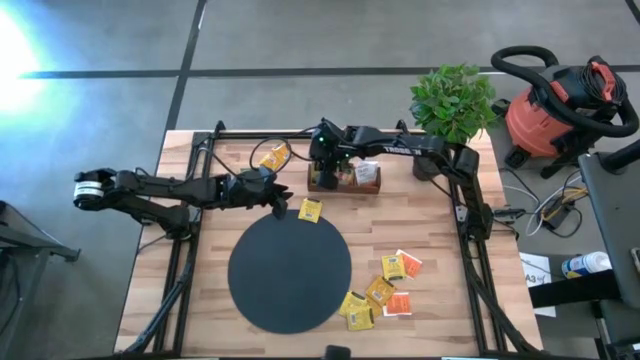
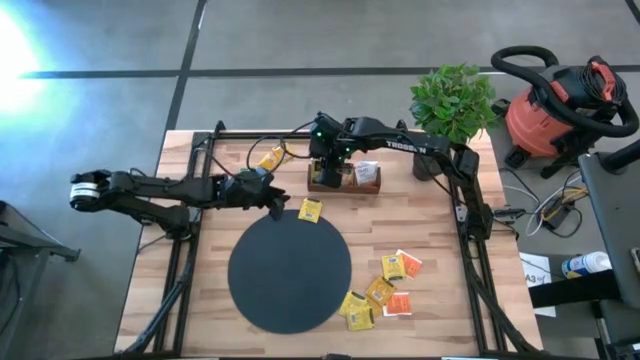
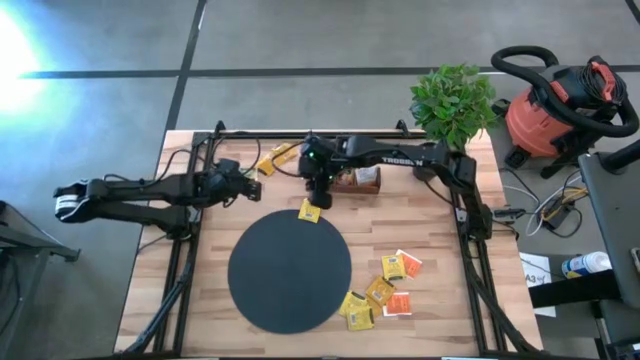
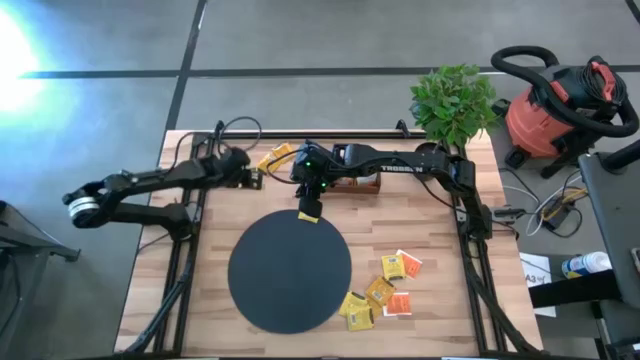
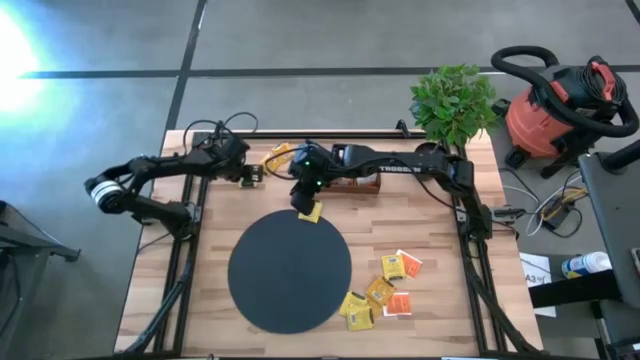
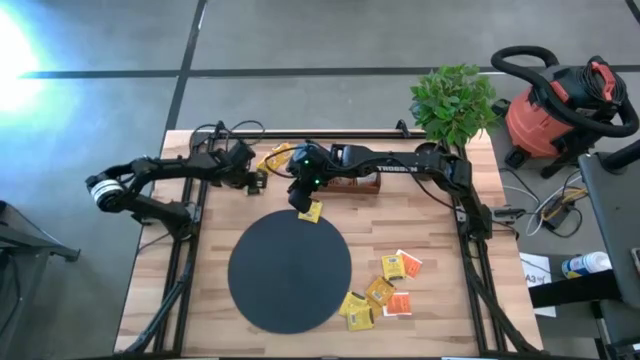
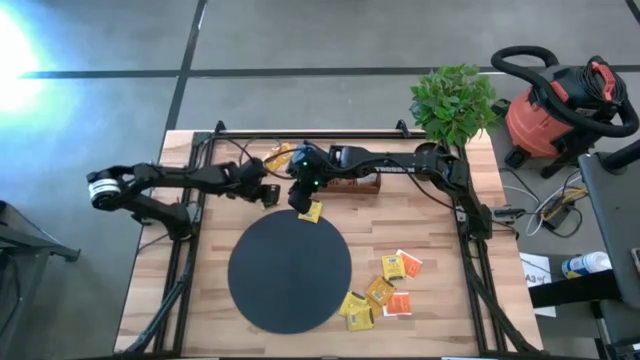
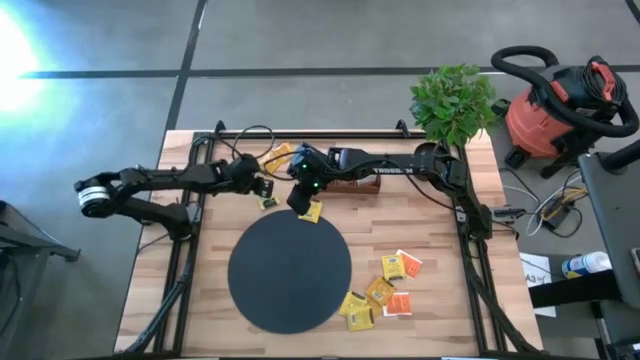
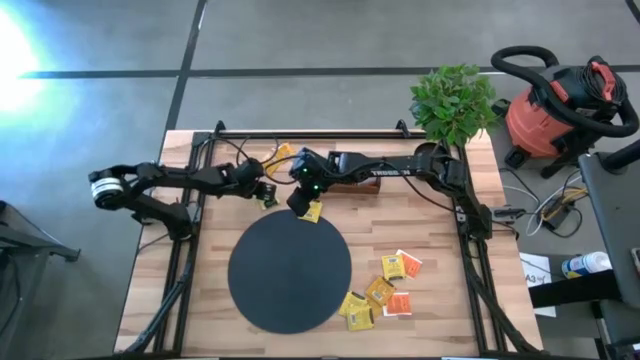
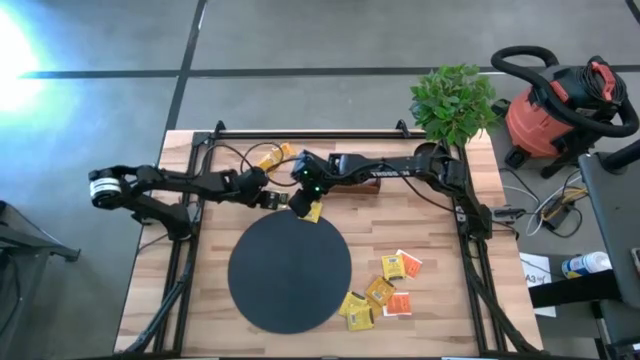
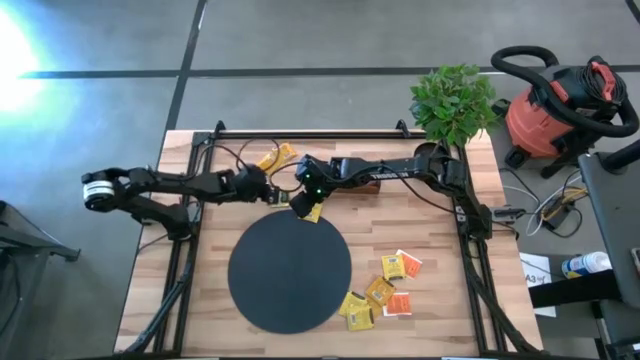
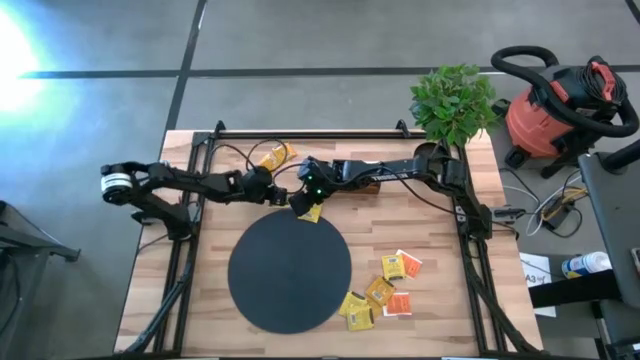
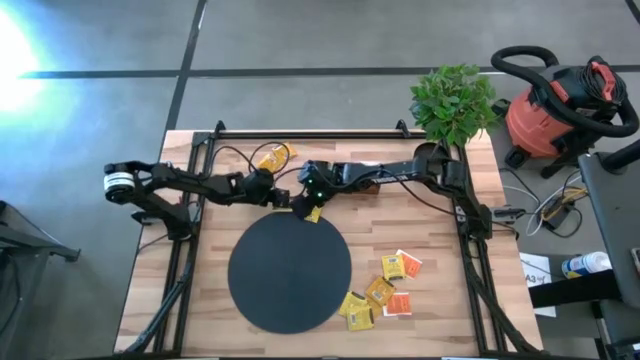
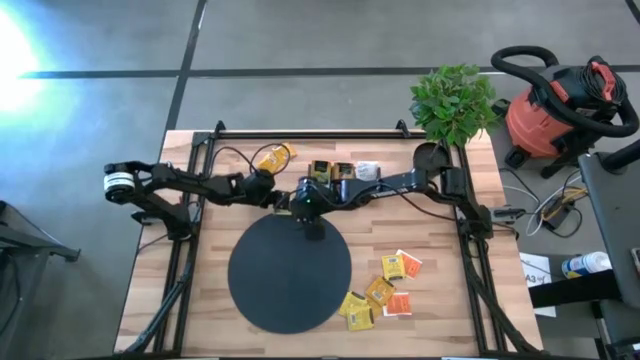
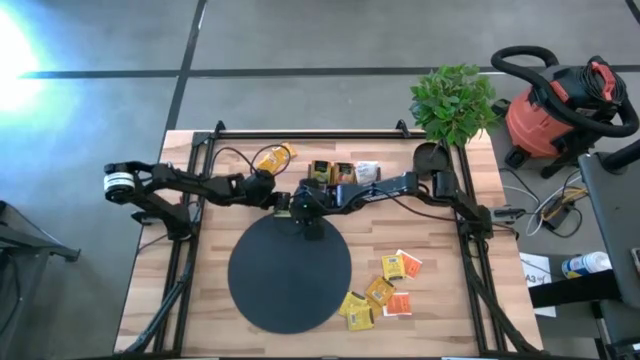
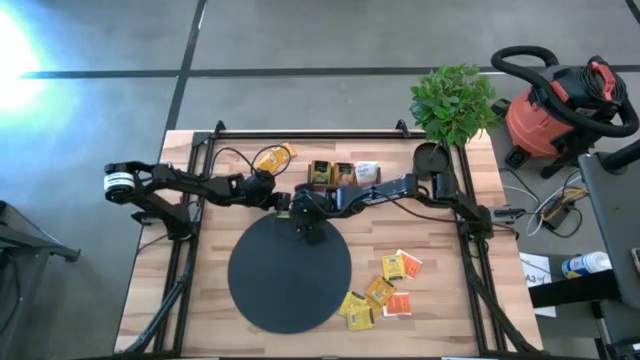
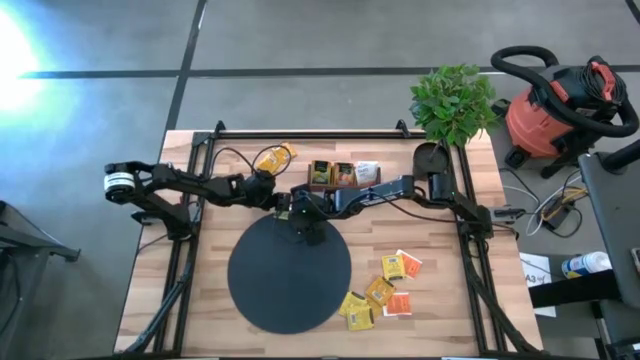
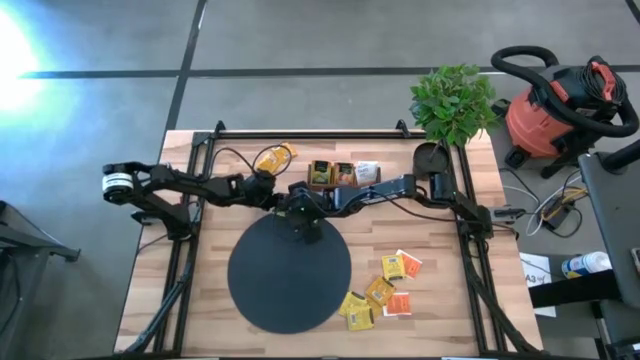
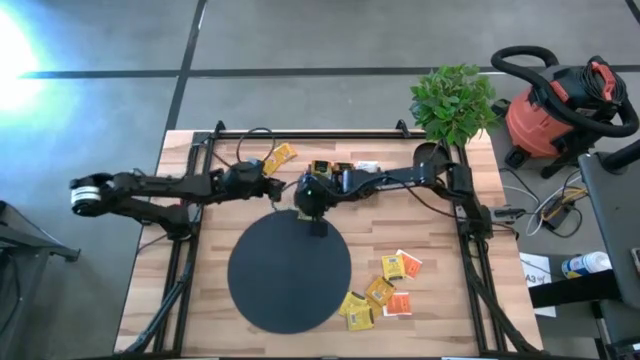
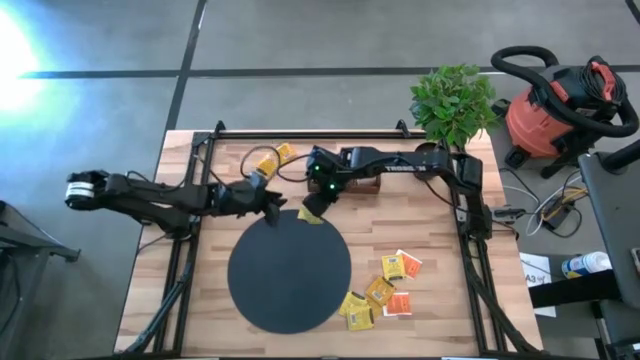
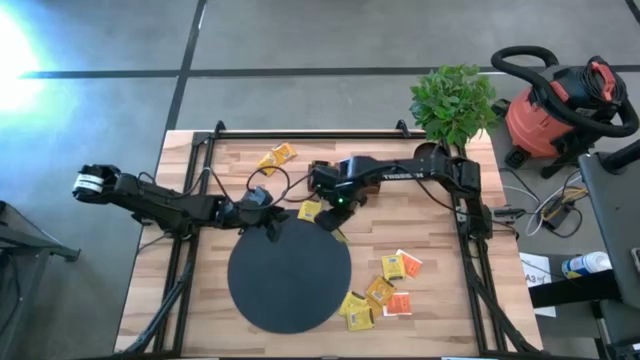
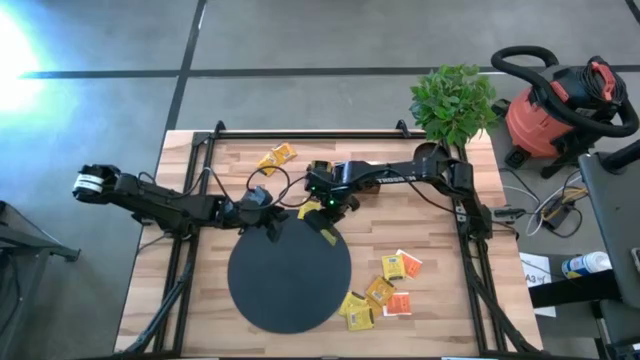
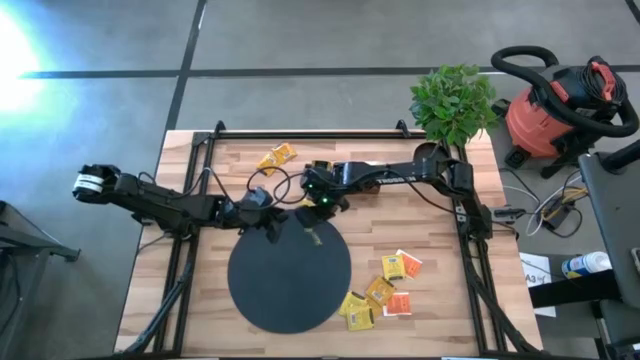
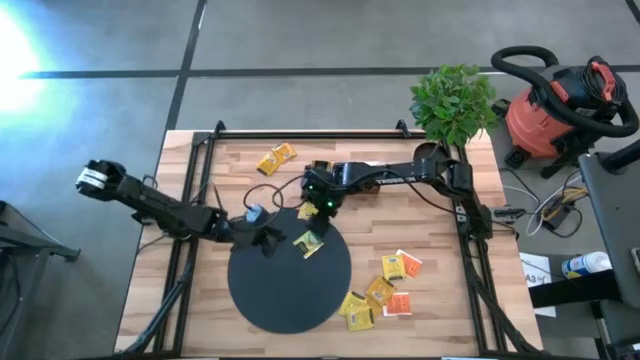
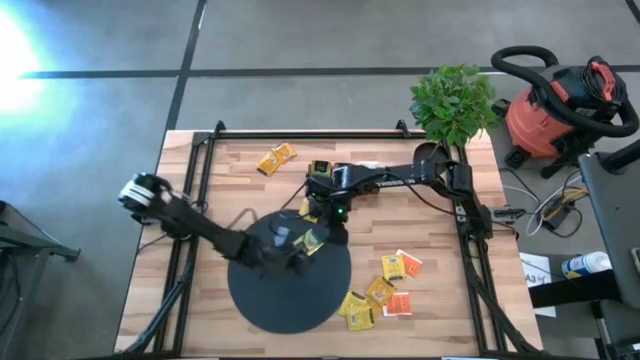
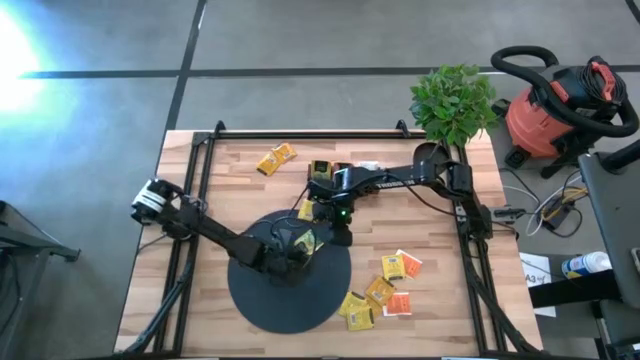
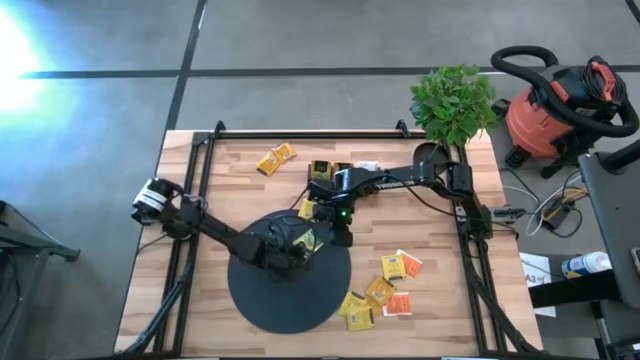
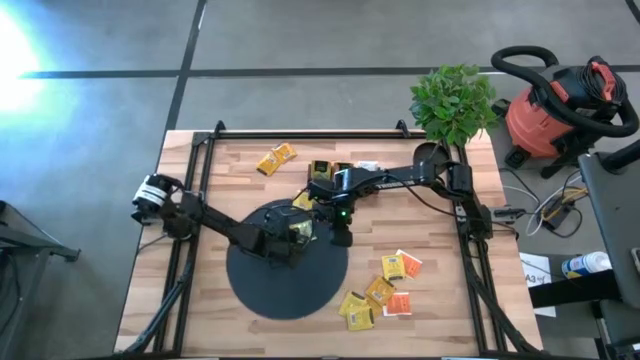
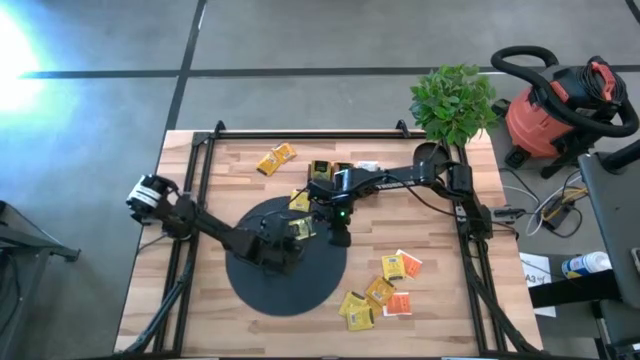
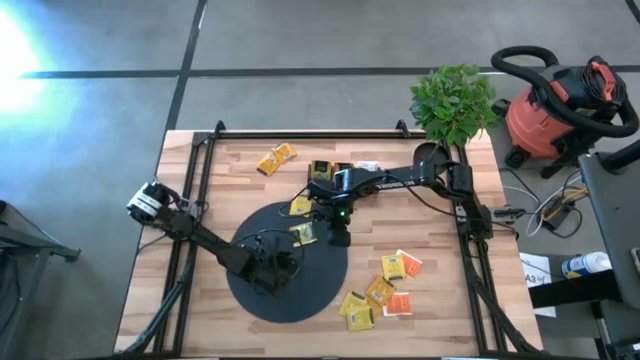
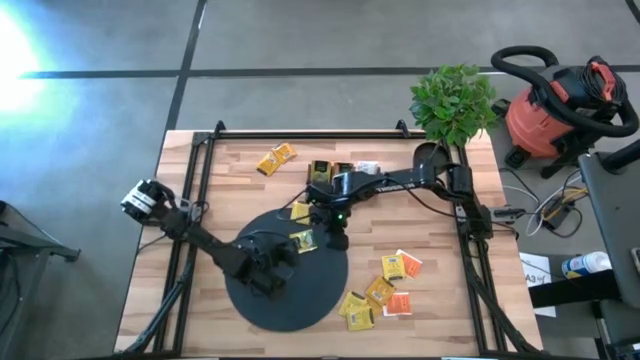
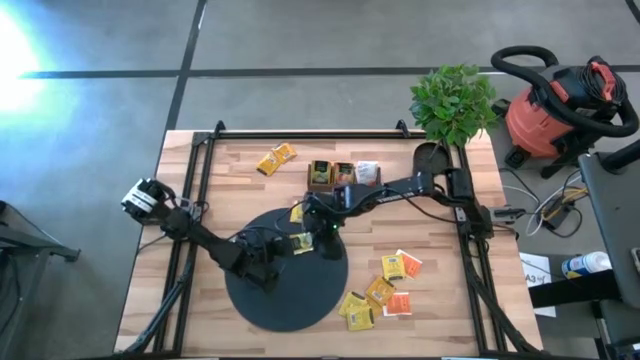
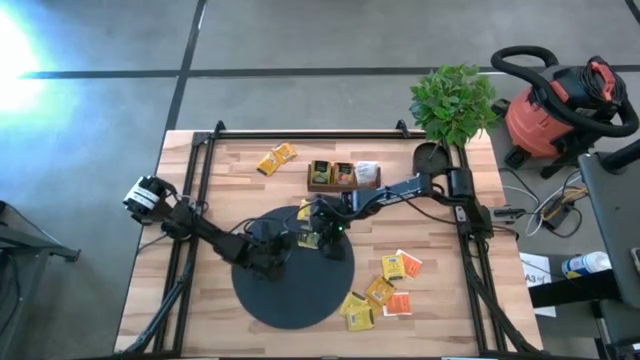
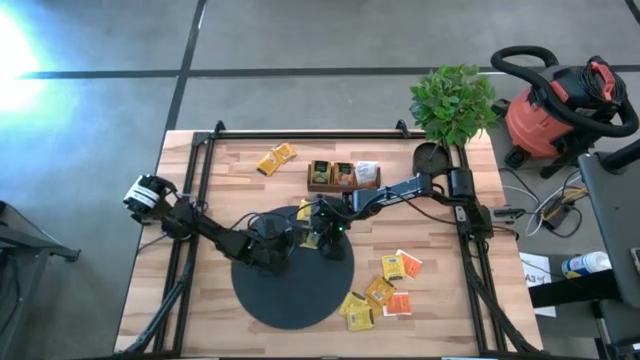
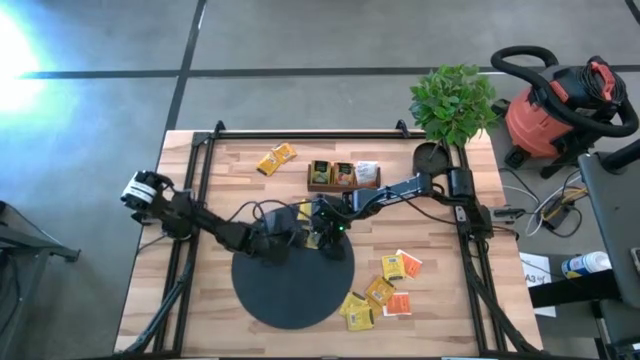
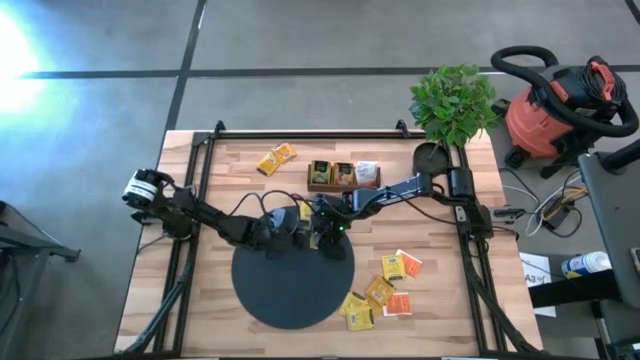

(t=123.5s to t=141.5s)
Task: Pick & Place Tea
Put the yellow tea bag into the left section of the wooden organizer

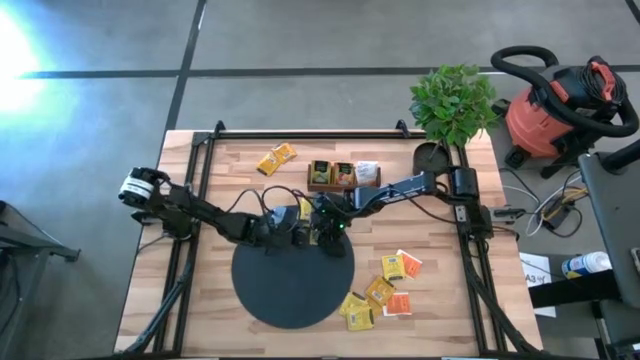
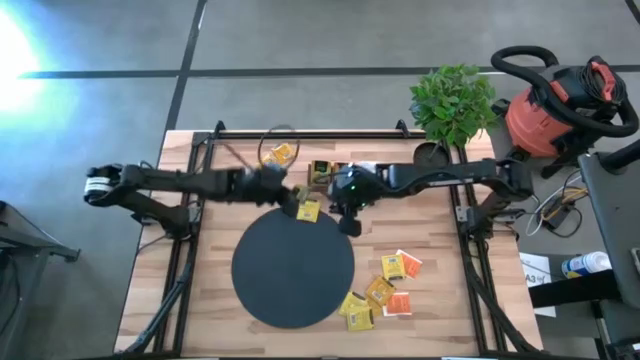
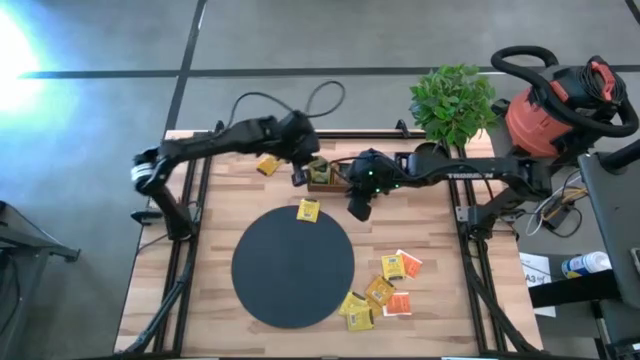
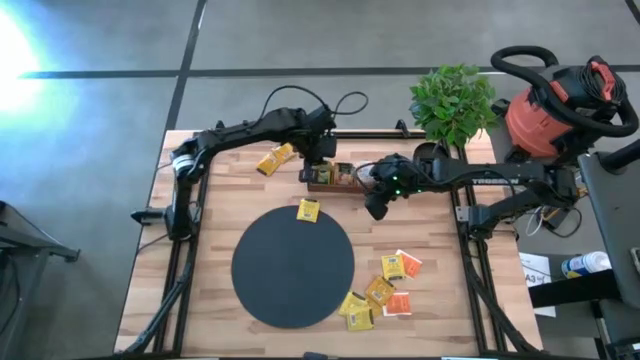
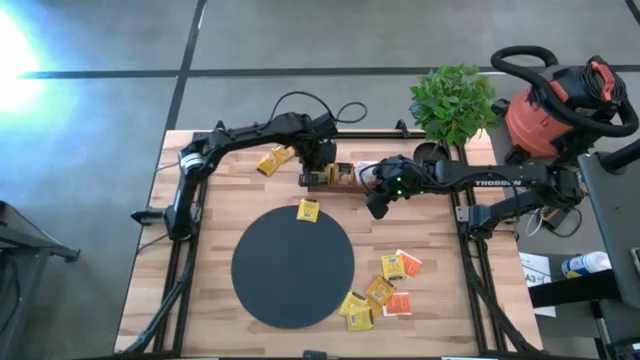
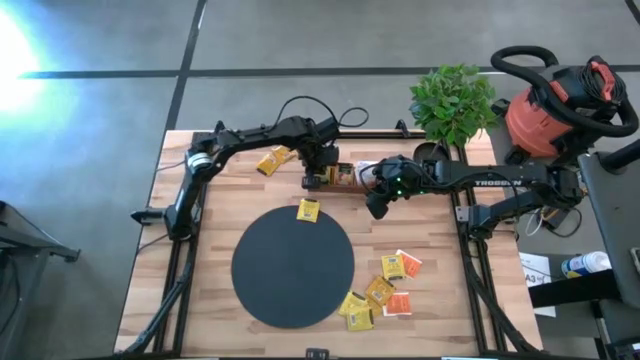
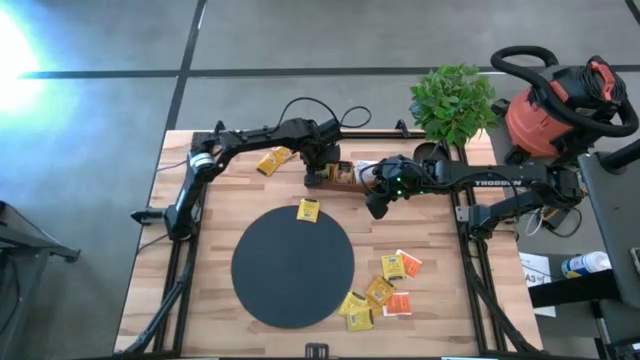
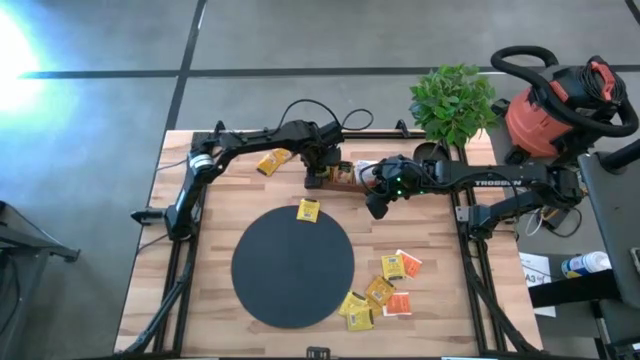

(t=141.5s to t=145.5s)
Put the yellow tea bag into the left section of the wooden organizer
